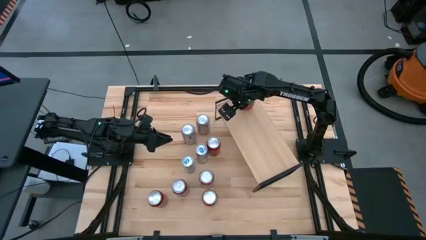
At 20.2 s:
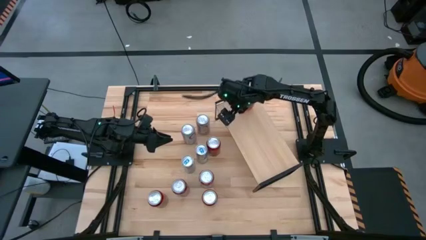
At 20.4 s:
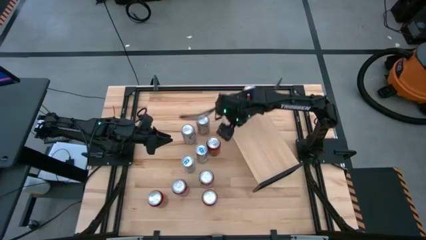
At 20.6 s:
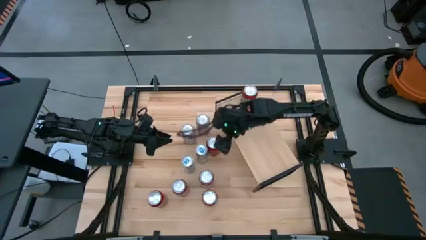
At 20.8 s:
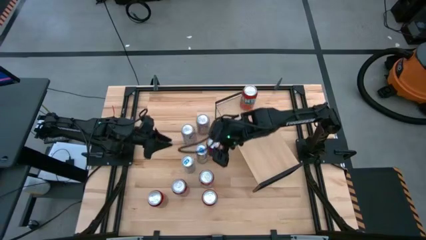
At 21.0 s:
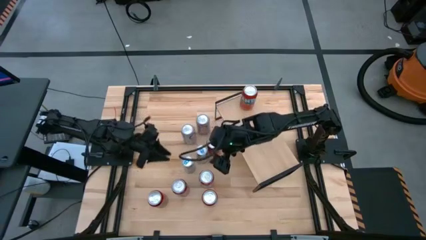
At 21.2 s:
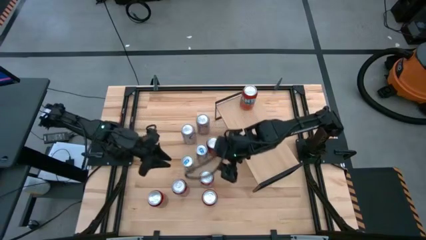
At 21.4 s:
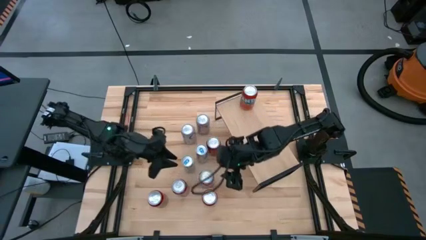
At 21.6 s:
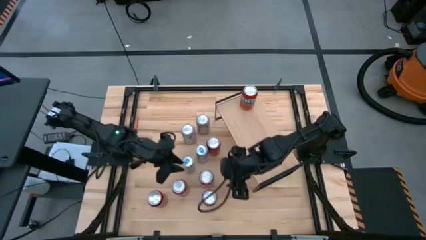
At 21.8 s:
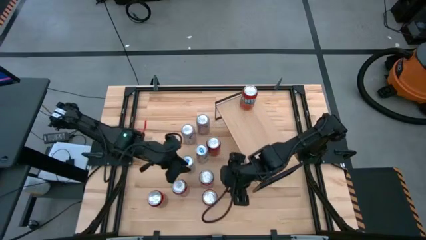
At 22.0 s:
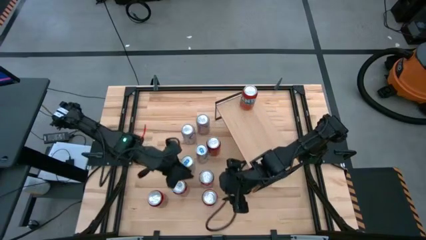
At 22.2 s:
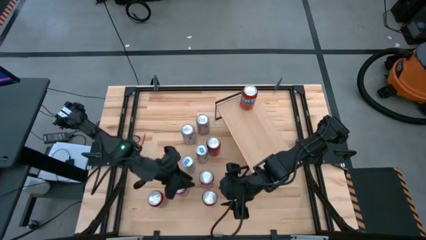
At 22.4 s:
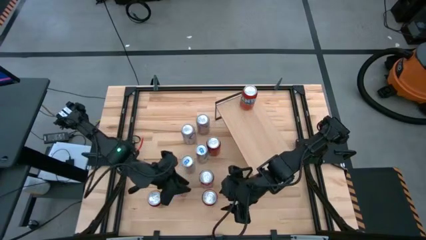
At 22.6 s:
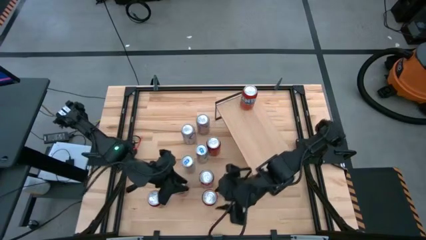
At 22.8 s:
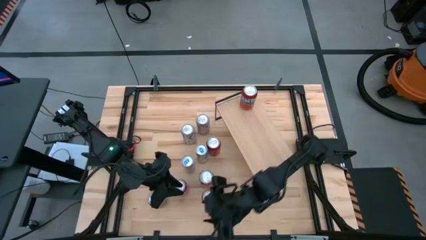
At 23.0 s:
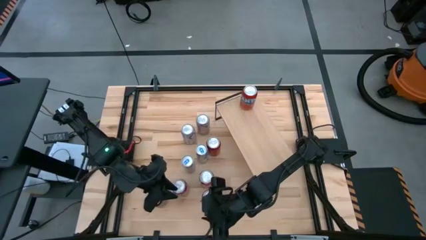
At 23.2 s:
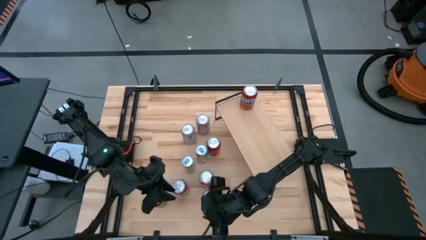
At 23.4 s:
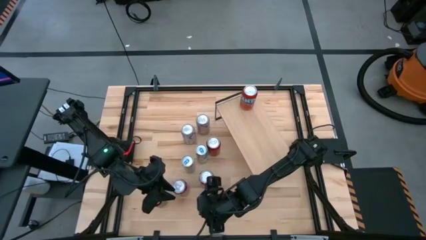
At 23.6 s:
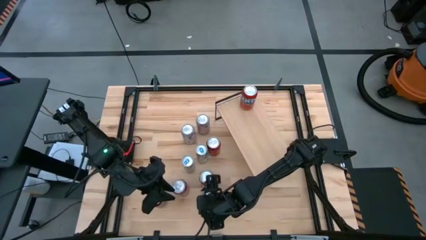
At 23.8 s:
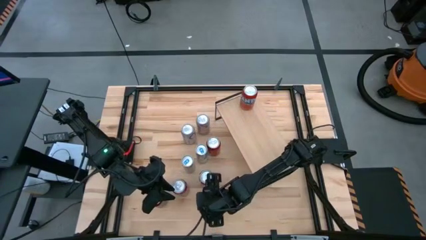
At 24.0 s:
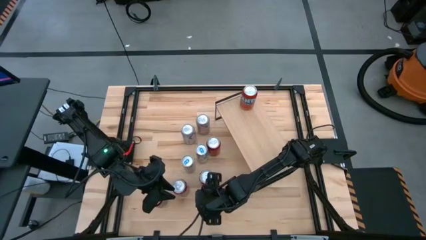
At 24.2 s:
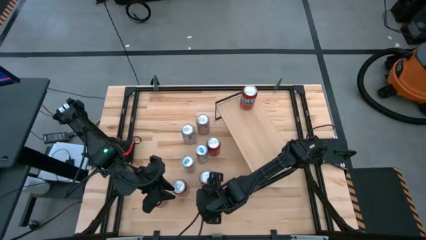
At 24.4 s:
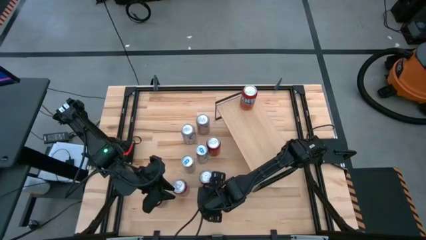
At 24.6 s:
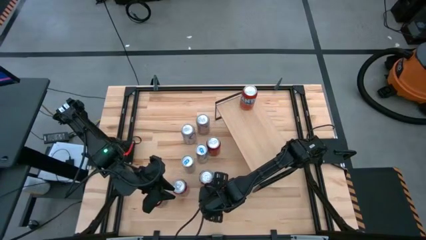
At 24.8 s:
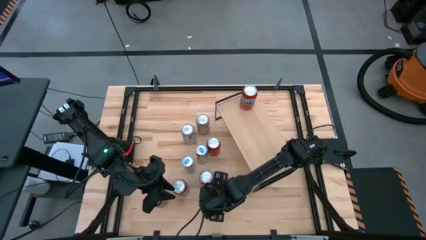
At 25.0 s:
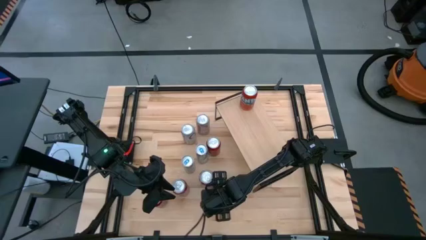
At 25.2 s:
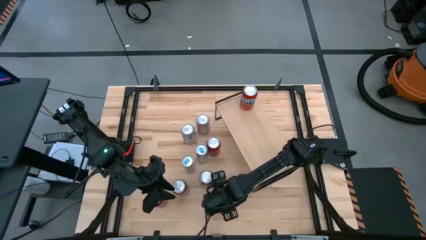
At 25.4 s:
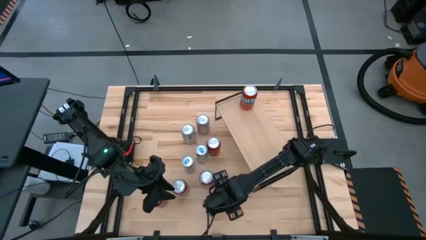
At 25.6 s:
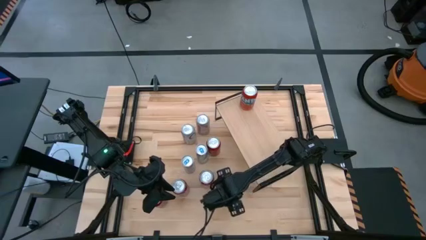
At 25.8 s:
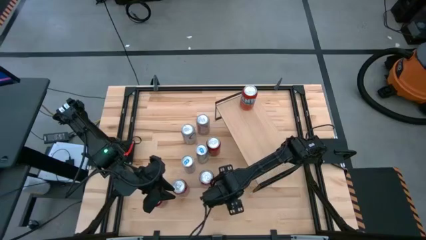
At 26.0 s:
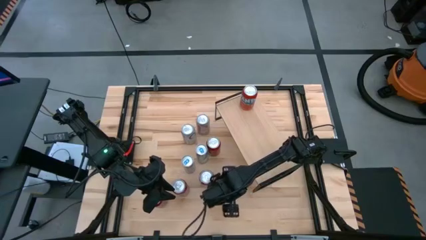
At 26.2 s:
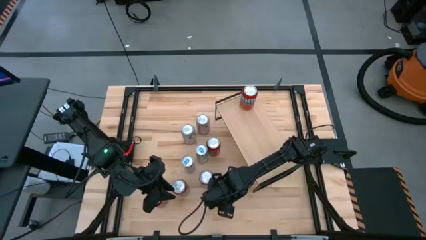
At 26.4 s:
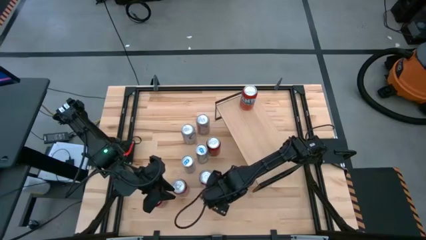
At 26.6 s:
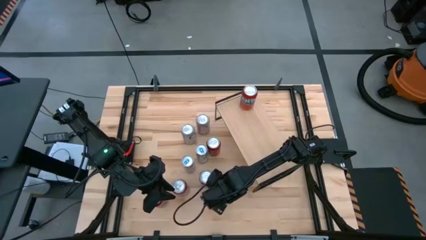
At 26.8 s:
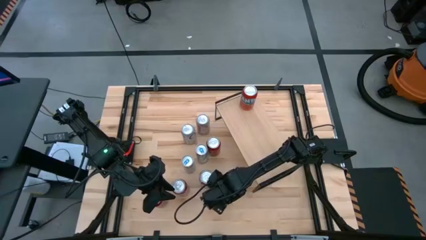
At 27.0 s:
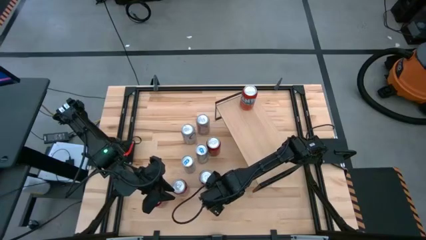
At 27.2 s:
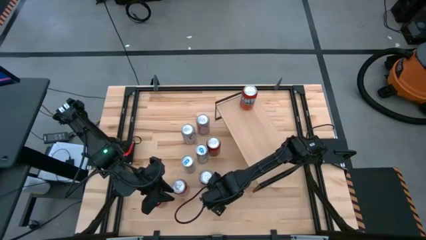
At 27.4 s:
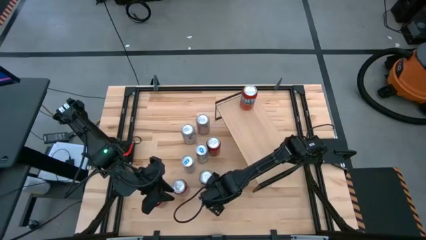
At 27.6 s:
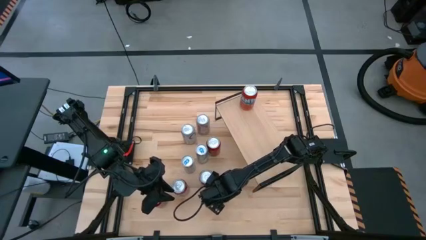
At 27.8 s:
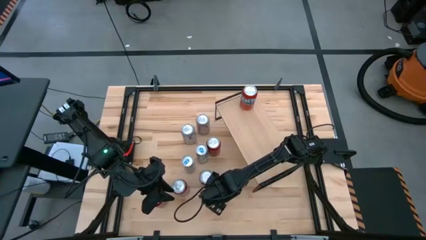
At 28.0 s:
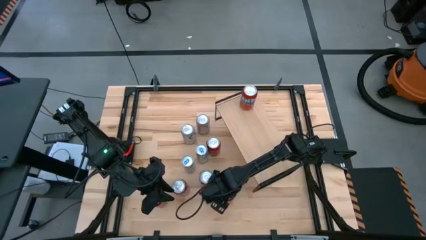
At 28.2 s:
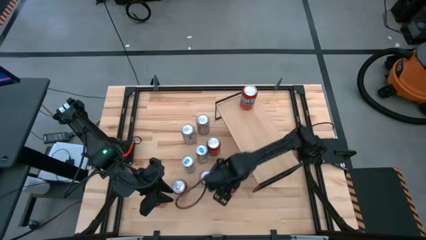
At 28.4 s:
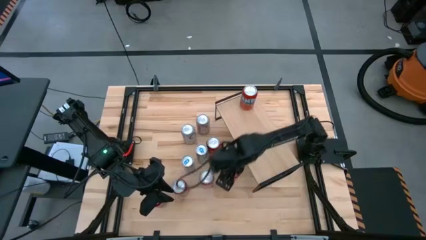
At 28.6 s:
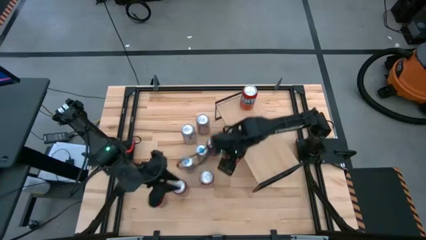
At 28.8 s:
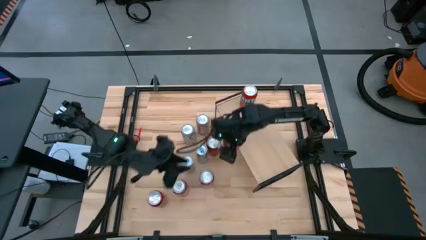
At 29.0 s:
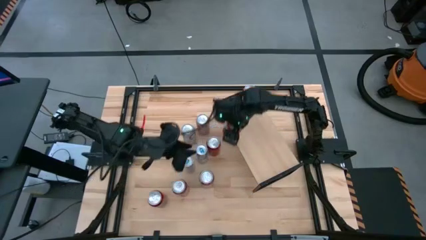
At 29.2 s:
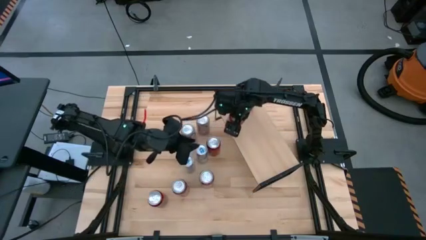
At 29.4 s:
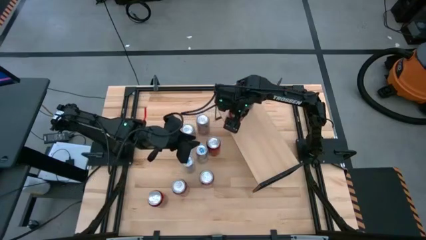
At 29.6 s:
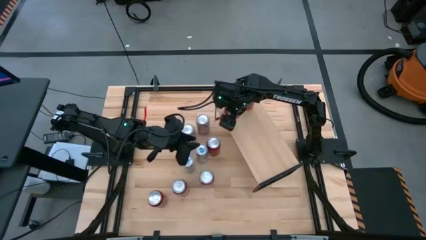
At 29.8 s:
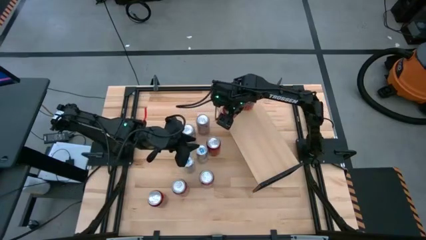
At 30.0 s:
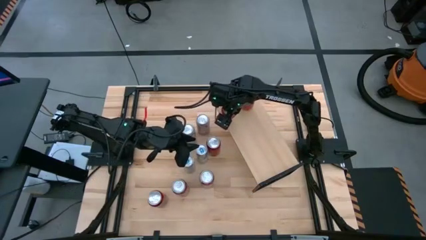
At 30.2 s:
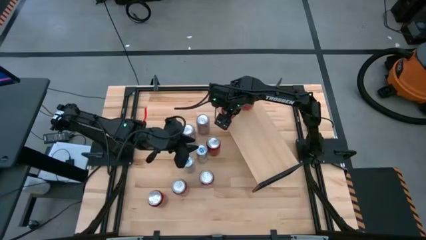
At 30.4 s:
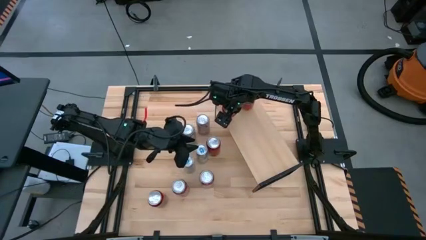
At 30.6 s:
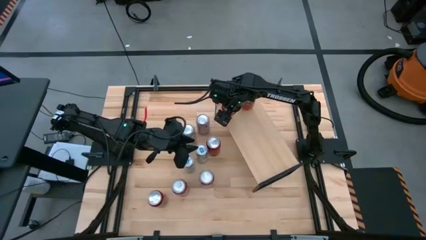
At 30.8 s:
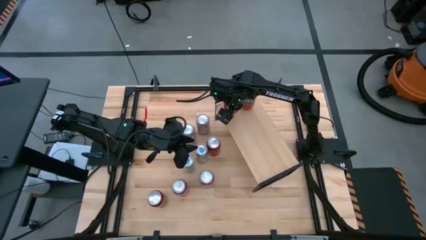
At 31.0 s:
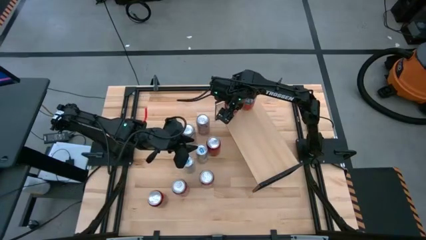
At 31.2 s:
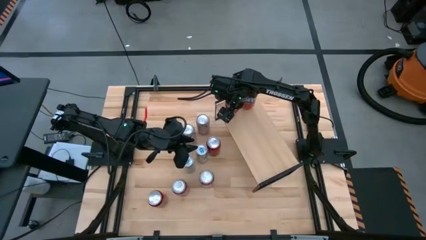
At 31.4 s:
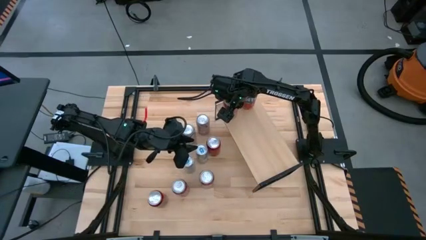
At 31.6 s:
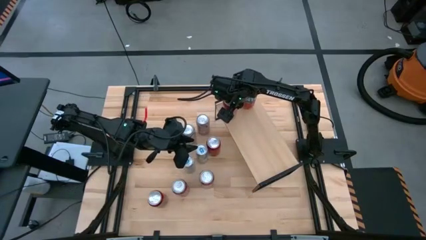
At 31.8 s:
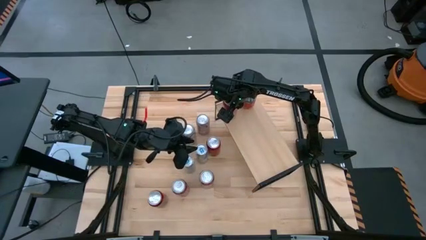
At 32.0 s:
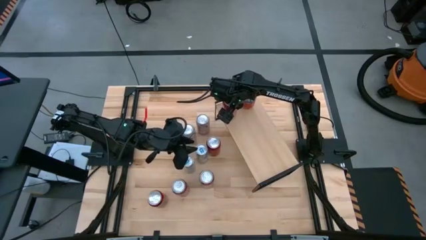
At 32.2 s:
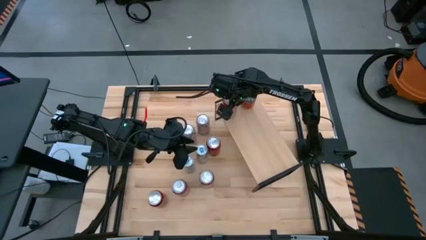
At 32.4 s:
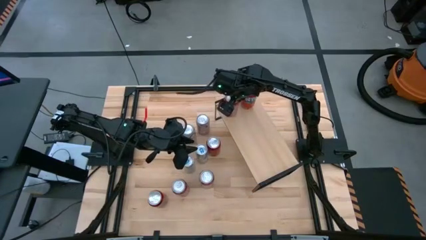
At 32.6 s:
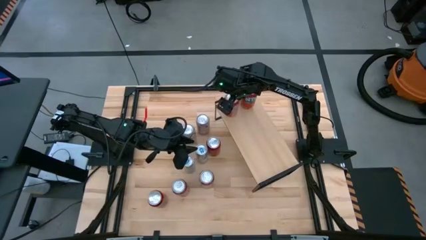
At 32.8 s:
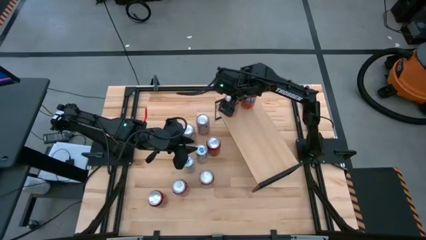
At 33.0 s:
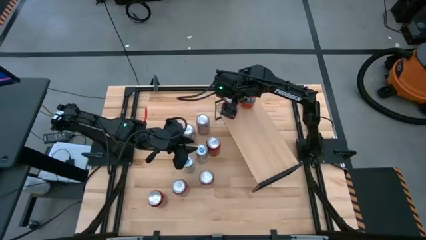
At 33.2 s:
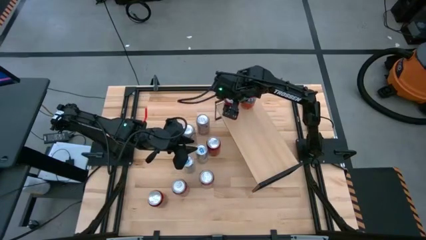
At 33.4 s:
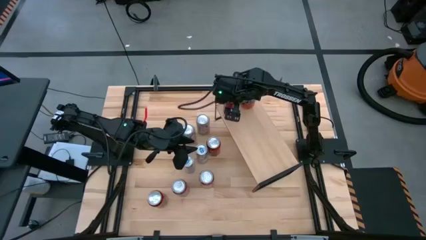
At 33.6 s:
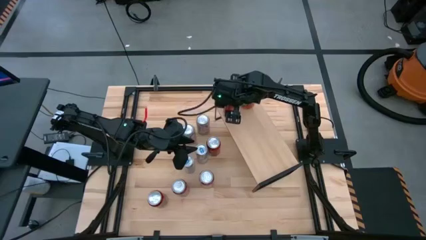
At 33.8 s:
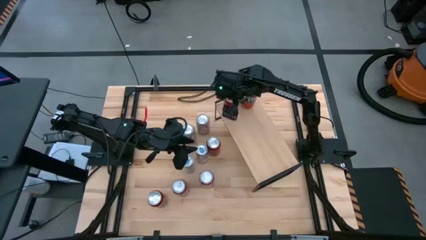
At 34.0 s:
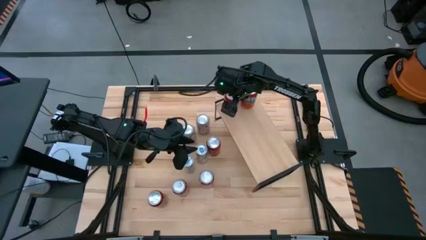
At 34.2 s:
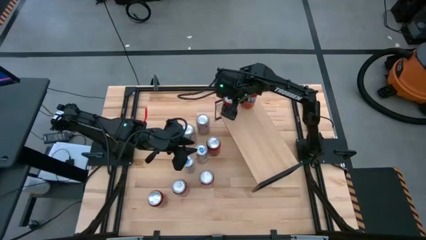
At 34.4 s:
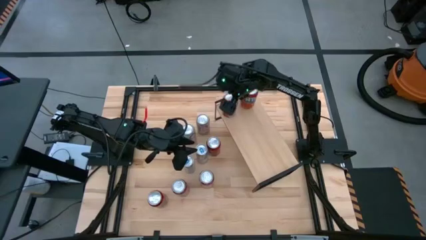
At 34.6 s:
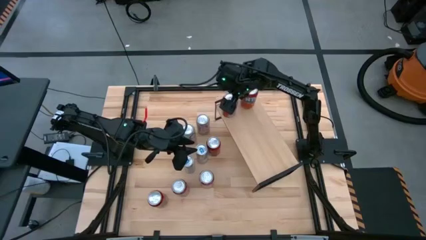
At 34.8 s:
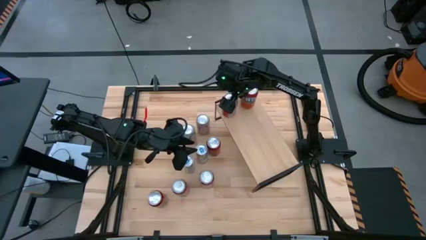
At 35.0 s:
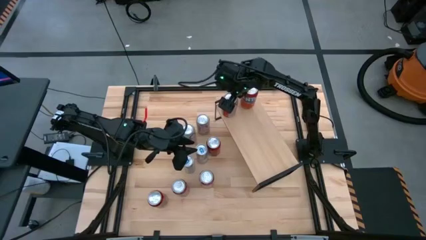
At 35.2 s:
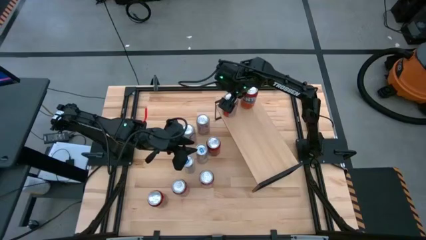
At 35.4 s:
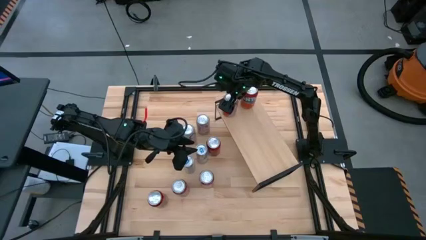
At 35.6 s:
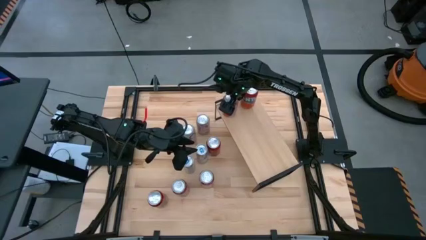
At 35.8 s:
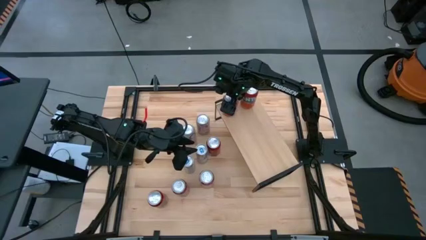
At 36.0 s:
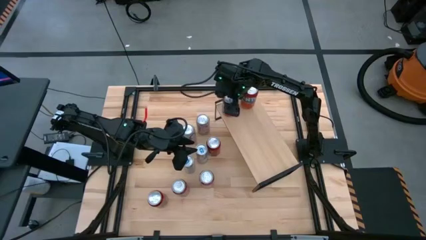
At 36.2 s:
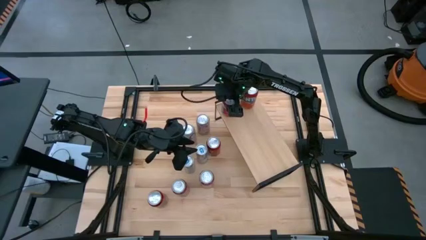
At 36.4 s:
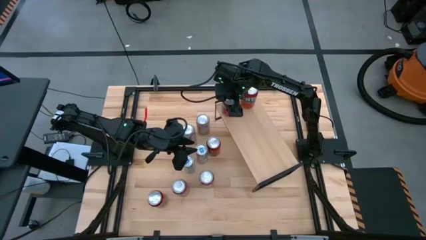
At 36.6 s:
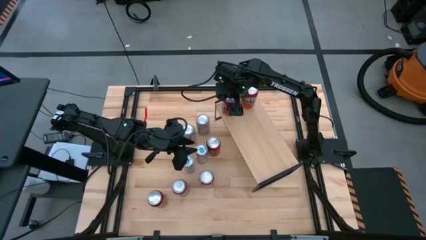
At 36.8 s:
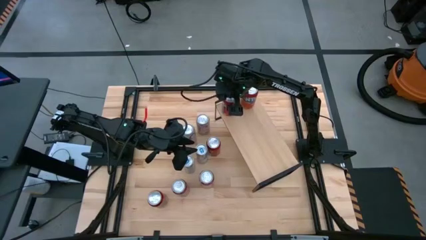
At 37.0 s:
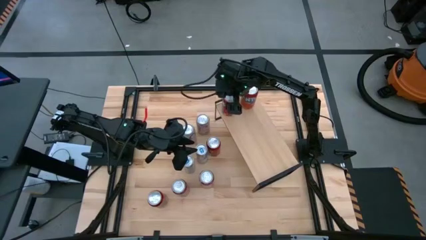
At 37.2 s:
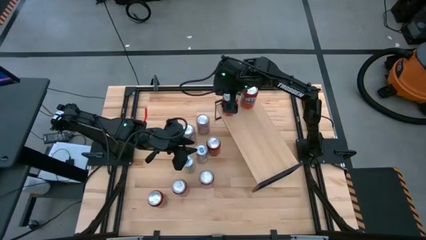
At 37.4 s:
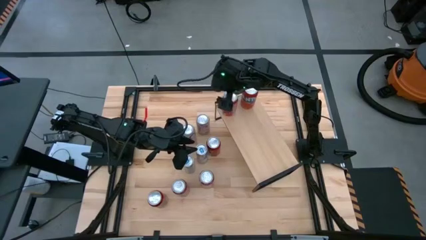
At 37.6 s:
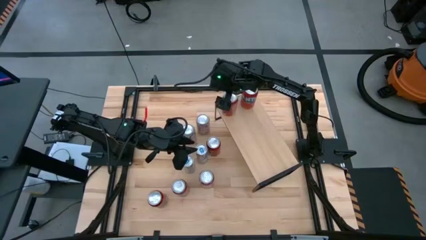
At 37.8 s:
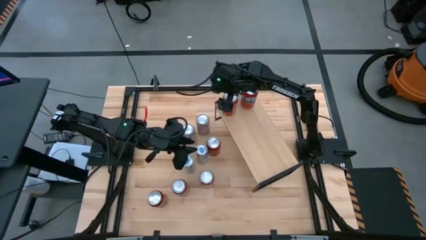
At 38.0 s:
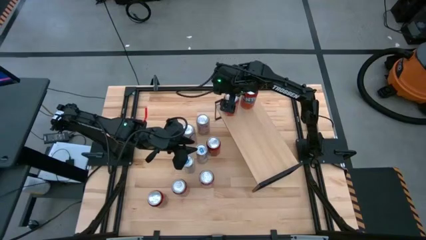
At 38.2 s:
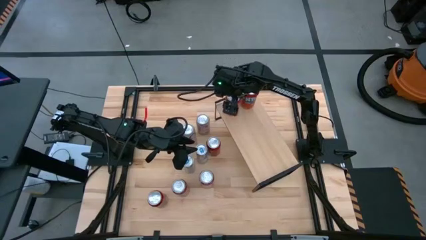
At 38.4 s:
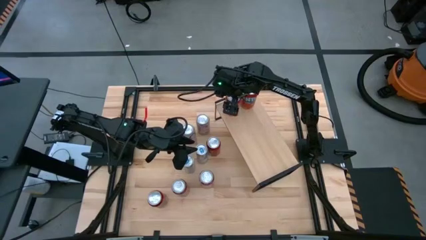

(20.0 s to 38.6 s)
Task: Place canned beverage on shelf
Put the orange soda can aligned with the other orange soda can on the shelf
